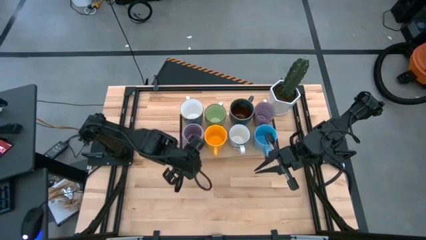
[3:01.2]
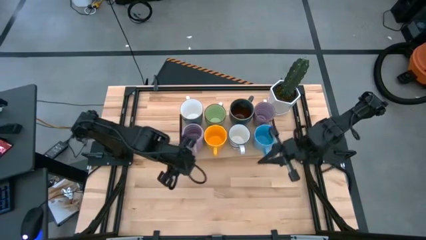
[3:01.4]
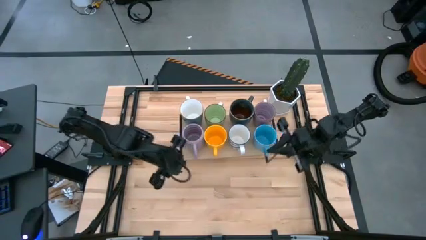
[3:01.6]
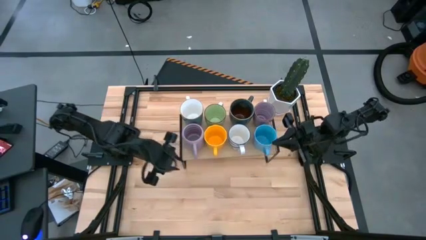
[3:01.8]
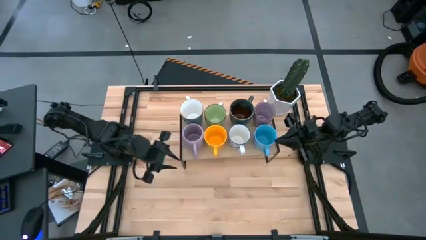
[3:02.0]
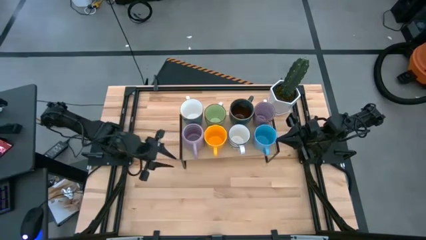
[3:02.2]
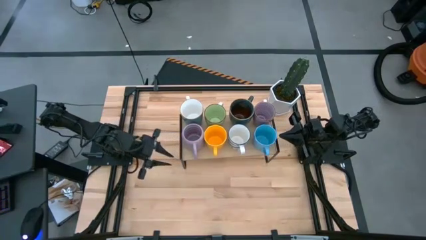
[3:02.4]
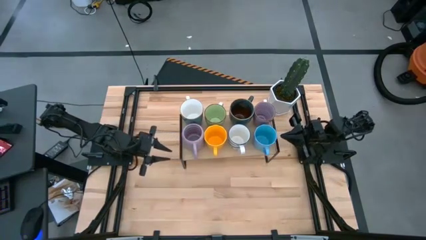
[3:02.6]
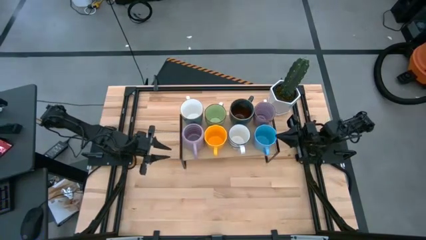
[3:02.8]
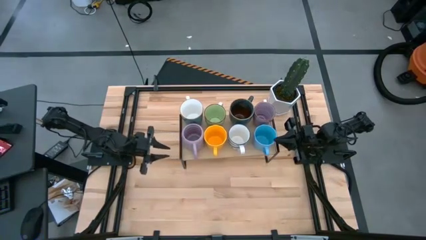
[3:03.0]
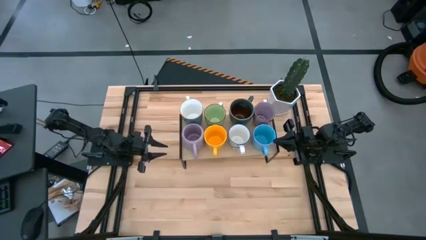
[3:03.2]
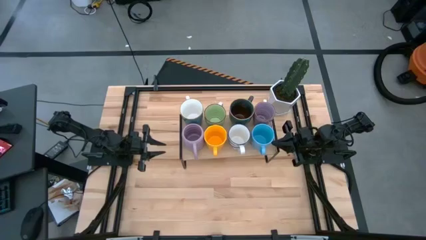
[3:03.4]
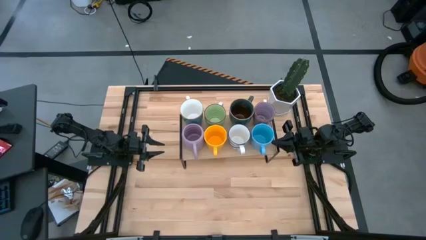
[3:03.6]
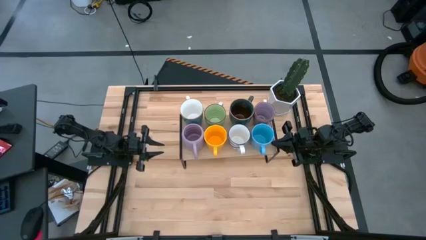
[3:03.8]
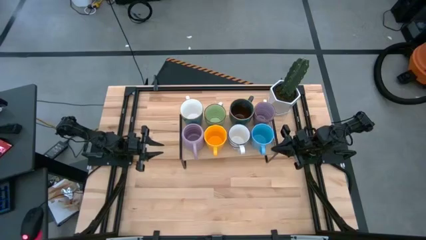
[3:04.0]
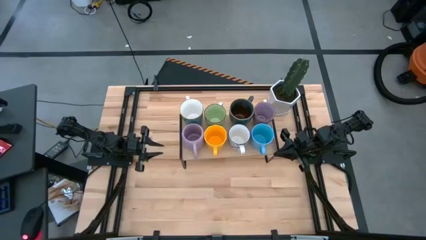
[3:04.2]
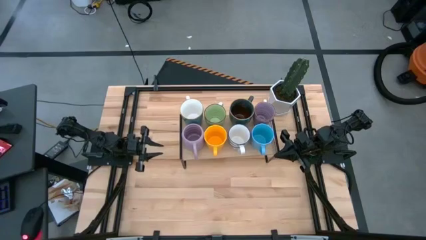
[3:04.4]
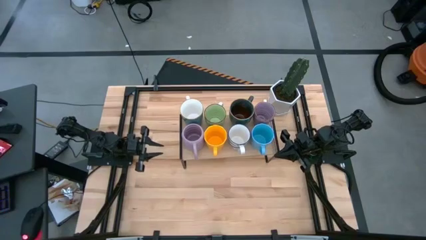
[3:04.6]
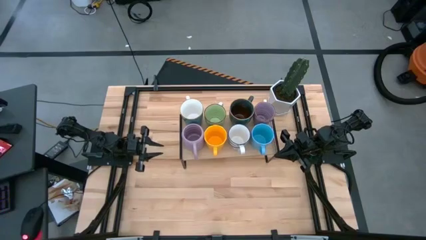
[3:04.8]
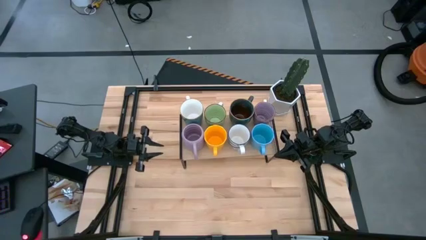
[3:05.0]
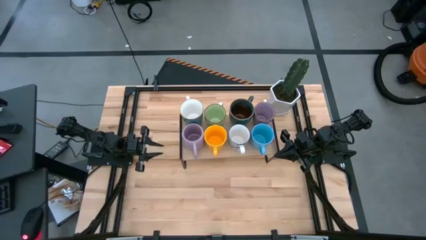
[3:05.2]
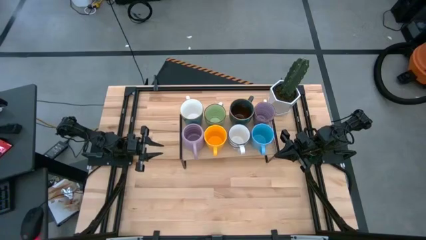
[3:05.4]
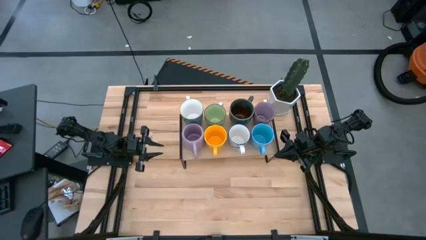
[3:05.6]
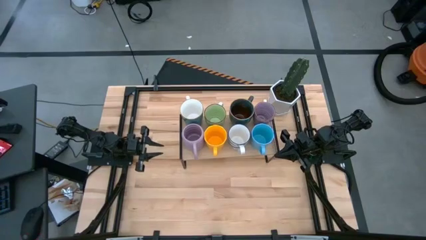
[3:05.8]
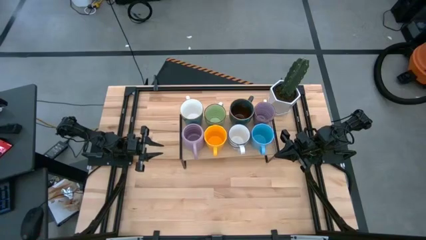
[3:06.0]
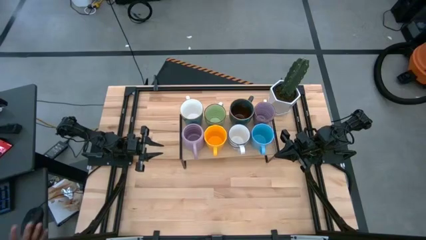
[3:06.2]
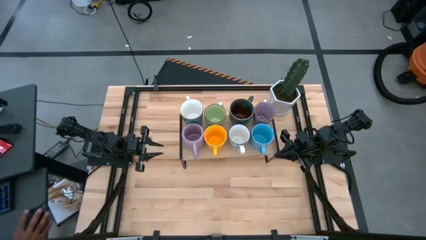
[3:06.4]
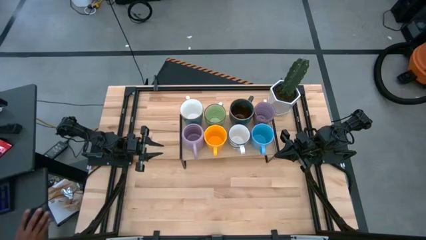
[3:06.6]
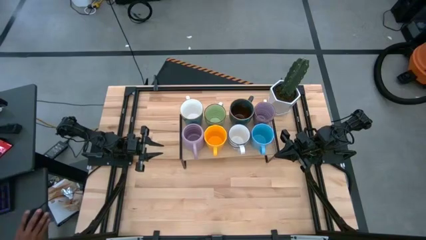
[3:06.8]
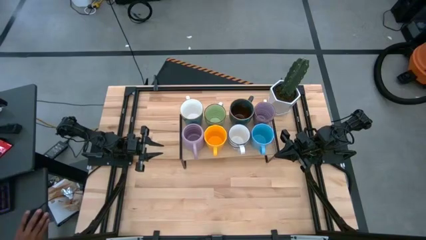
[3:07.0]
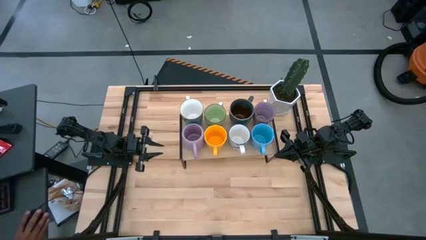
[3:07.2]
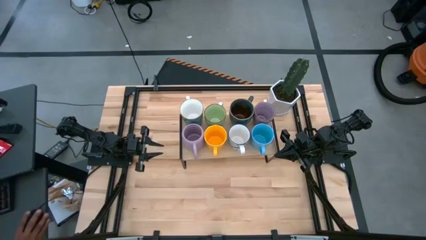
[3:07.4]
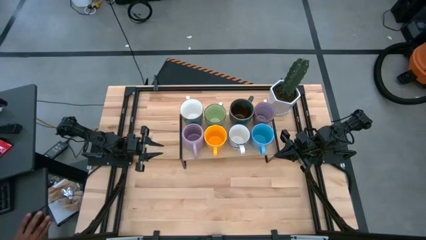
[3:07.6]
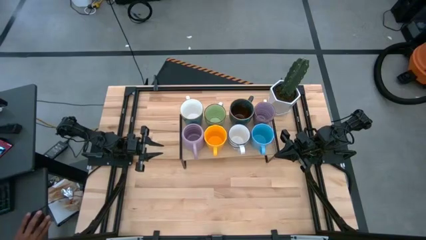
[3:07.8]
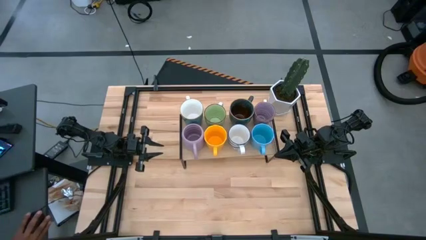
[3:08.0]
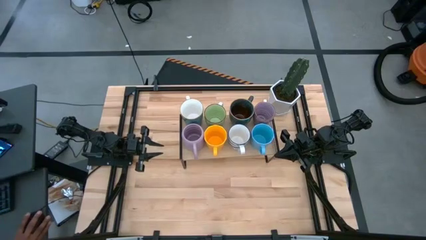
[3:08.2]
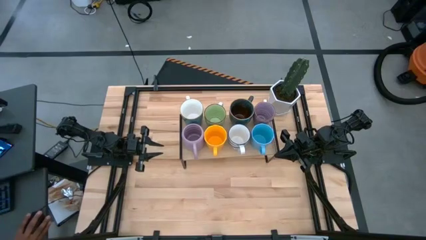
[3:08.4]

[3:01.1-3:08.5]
Task: Place coffee mugs
Return to Home Position

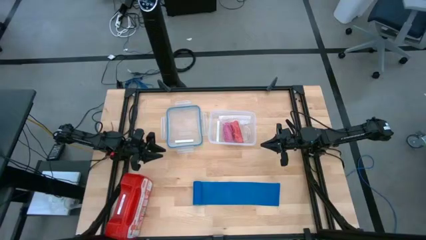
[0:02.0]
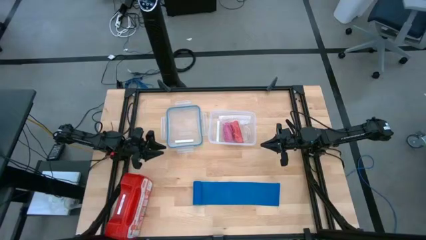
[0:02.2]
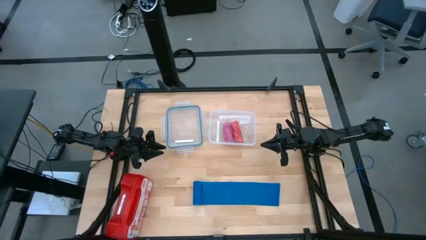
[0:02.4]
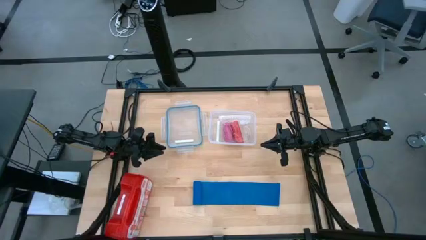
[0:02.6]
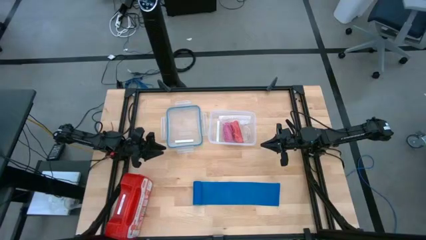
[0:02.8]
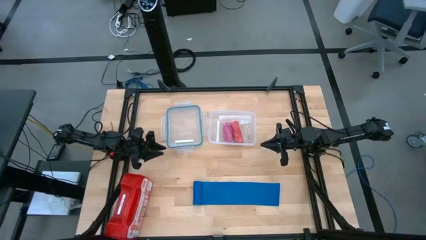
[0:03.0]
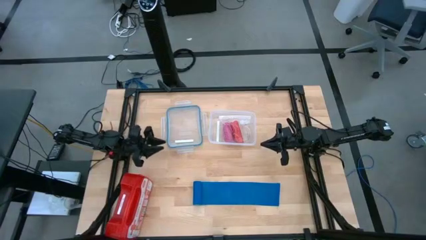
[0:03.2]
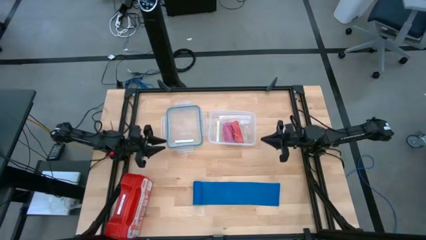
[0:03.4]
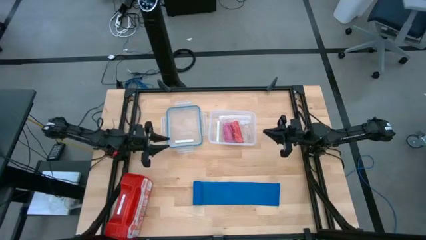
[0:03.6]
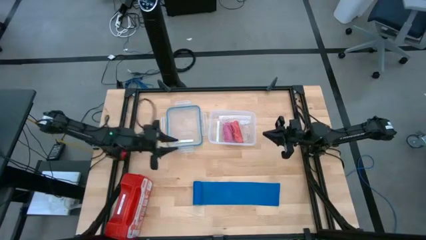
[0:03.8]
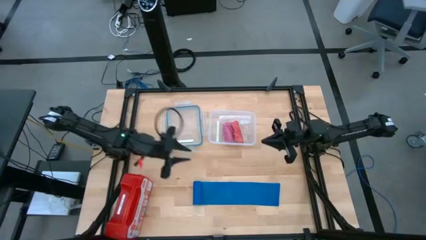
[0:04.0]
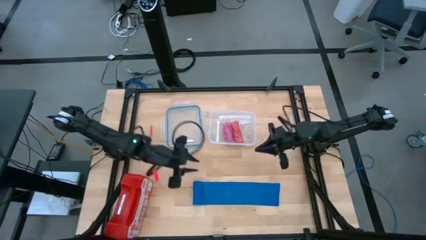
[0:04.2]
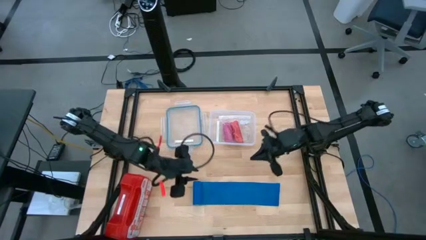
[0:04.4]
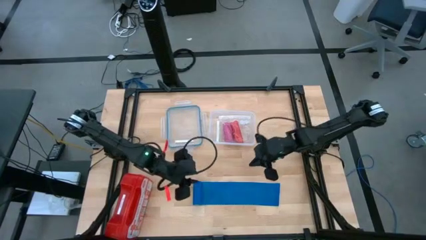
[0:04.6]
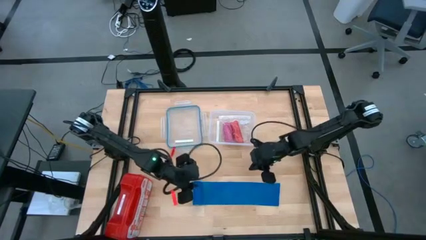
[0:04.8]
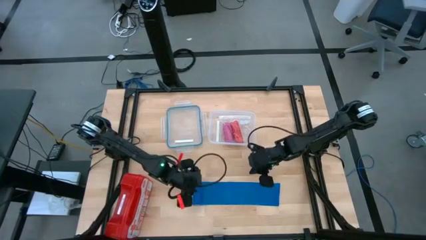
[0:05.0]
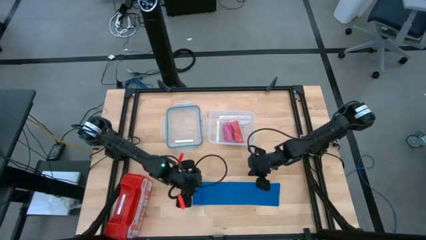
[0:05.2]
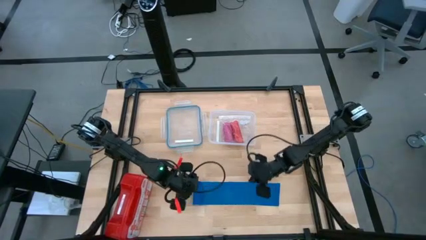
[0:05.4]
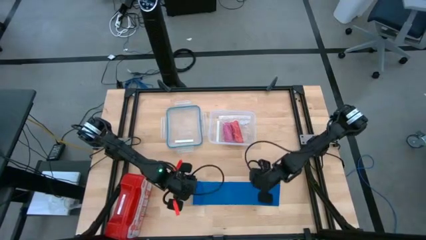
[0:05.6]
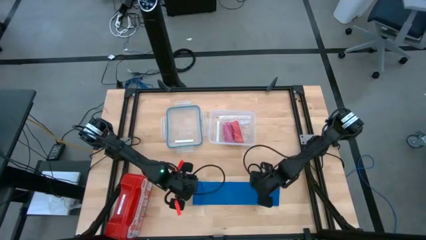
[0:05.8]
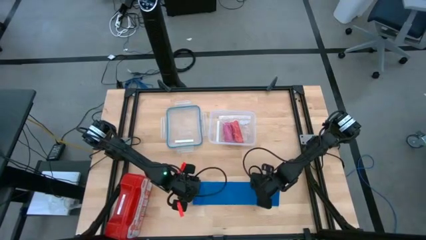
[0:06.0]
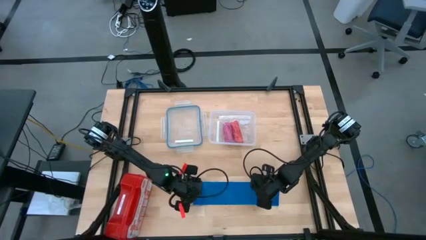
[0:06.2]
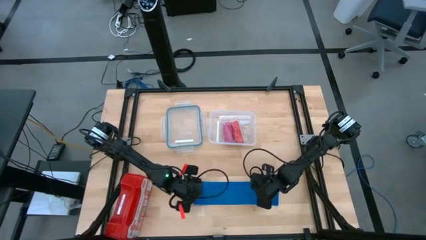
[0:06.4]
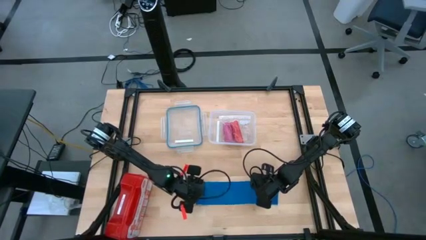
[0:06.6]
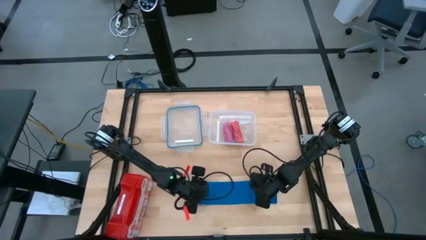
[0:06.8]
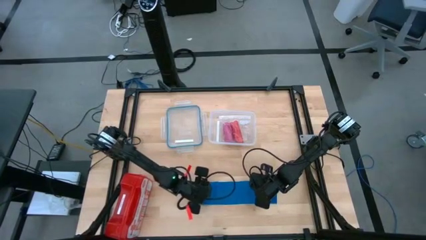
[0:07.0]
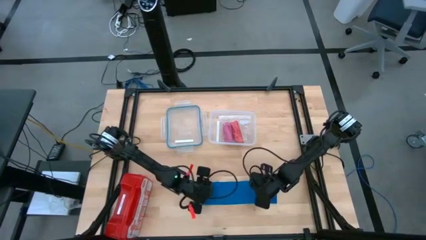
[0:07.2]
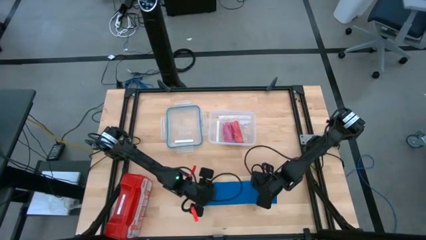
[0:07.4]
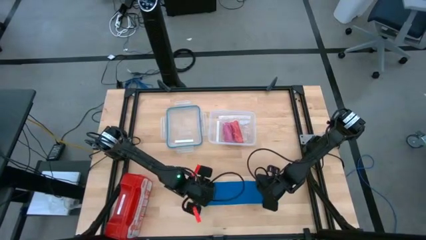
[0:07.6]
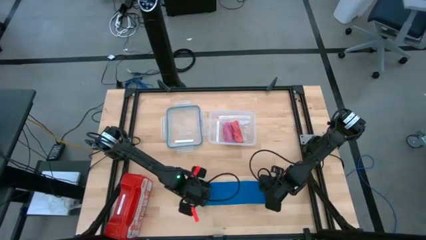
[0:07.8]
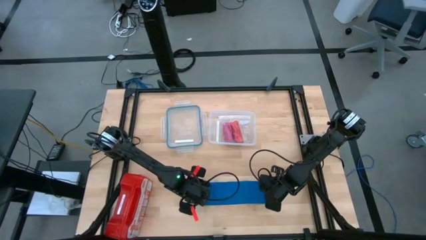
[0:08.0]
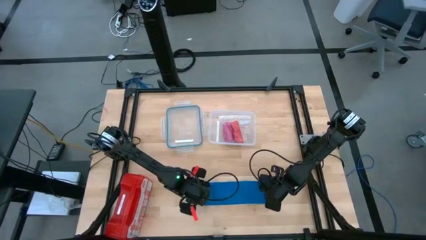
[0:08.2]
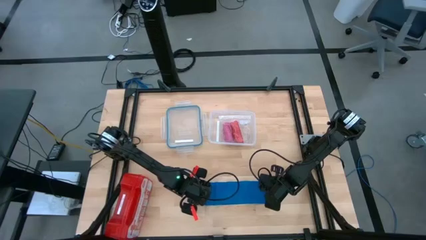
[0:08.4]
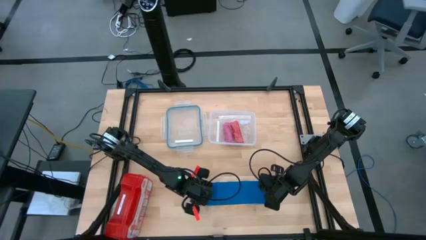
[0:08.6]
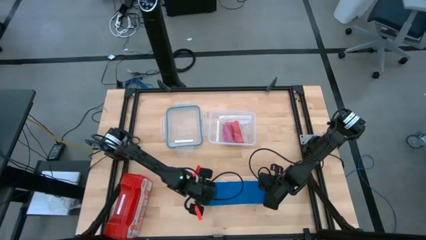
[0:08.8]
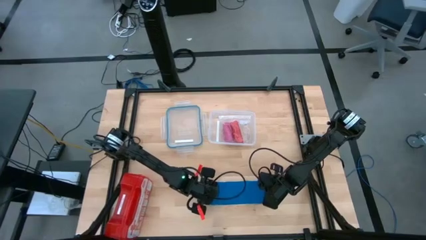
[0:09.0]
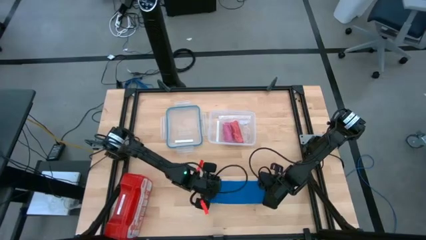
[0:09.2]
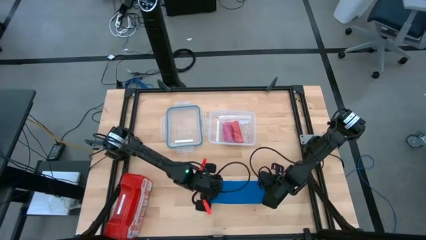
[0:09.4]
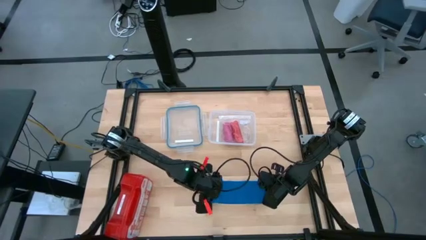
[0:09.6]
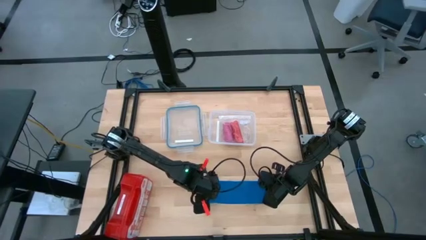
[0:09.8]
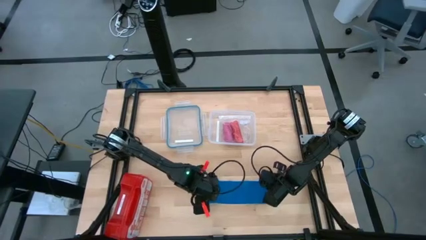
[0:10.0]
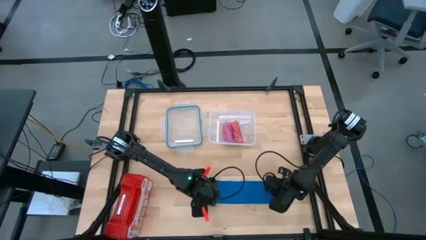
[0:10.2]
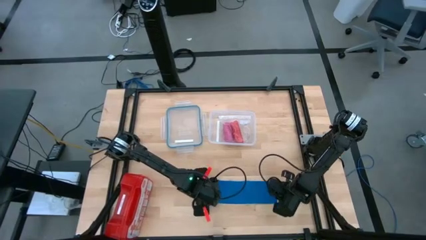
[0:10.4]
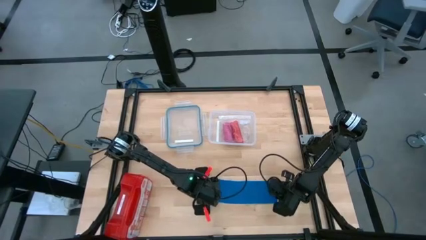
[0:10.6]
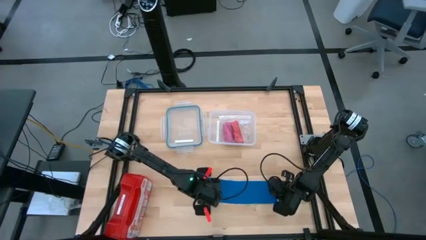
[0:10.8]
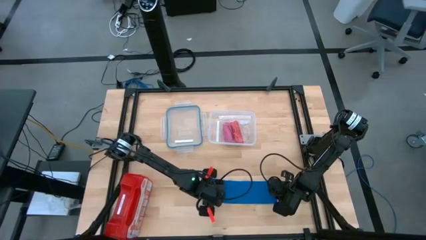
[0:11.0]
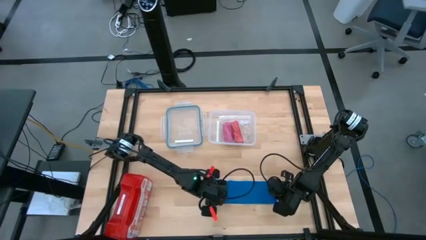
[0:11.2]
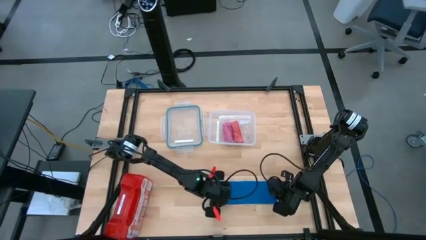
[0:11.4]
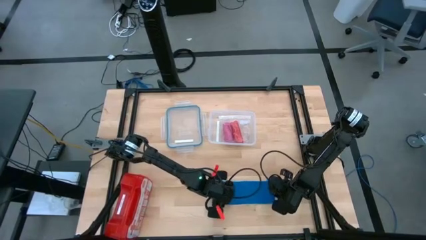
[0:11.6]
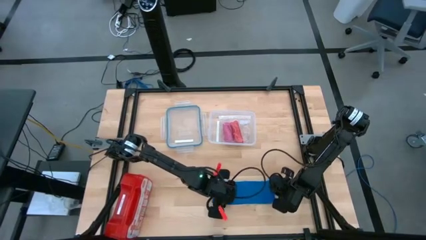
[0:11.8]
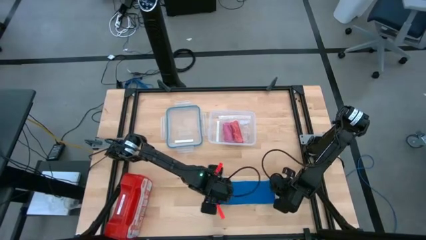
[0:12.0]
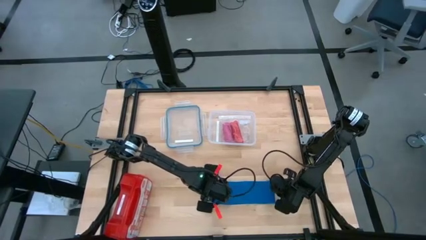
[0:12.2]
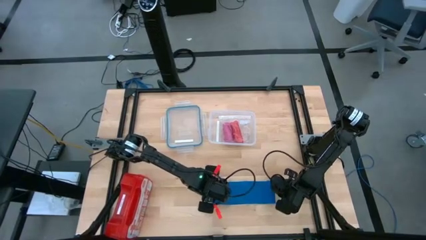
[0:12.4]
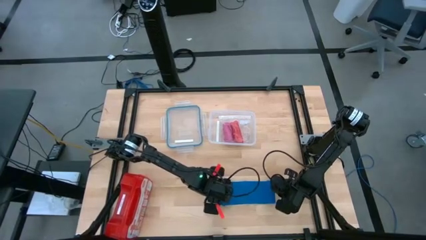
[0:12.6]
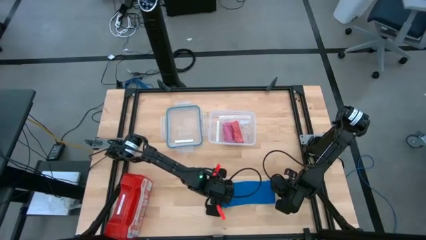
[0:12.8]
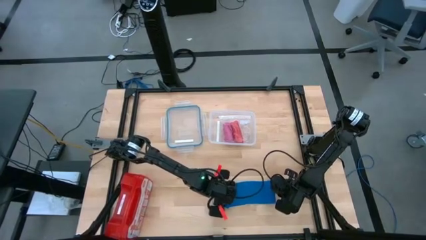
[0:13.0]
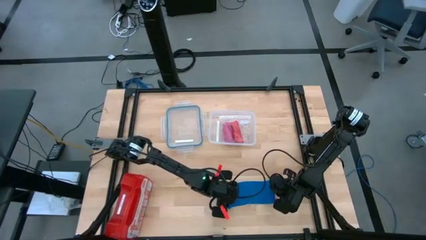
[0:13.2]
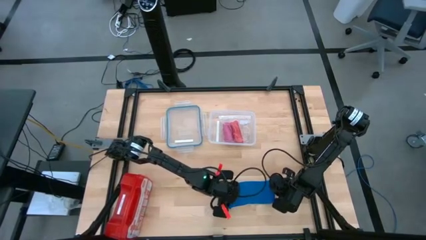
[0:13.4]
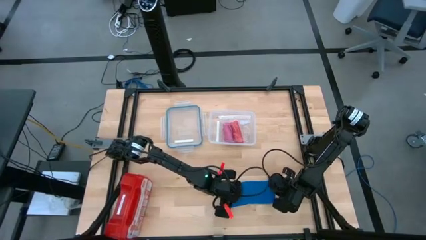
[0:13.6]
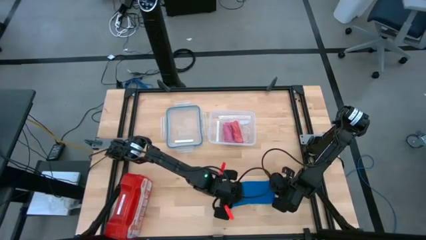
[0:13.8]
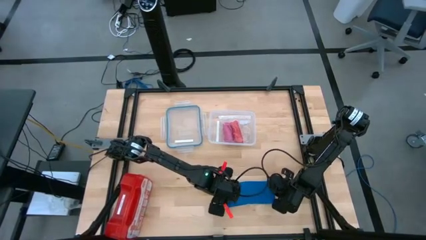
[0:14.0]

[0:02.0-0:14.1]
Task: Roll bandage
Roll the blue bandage
